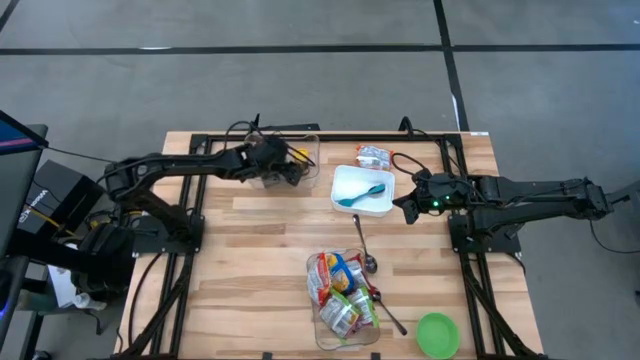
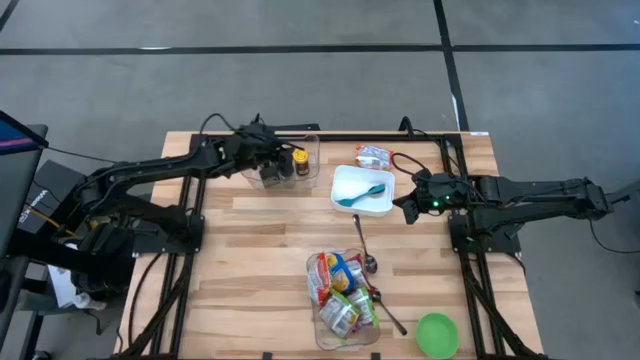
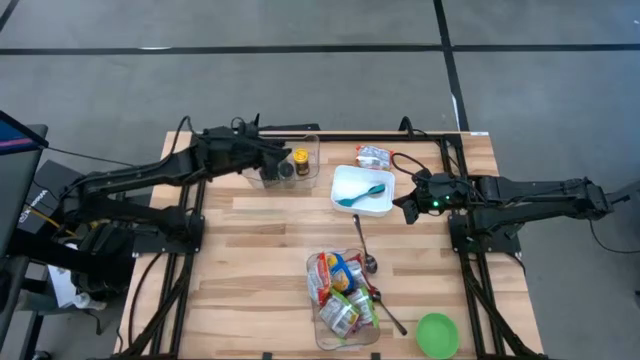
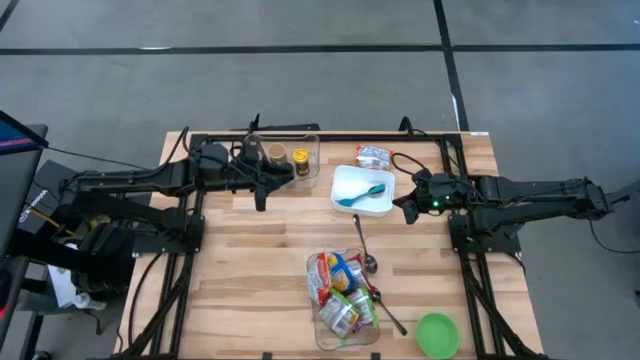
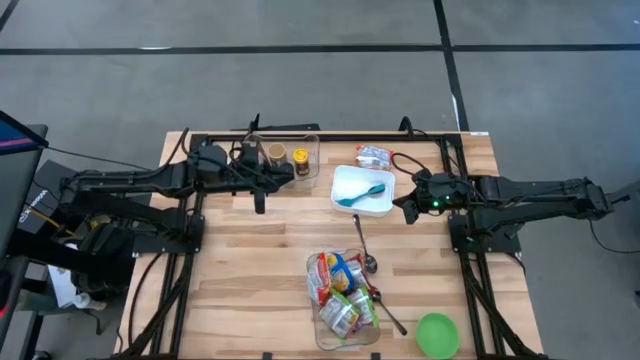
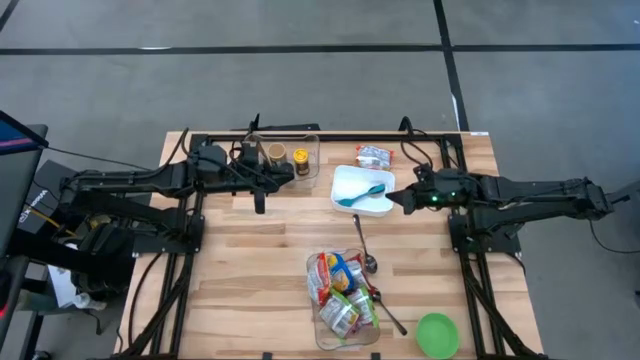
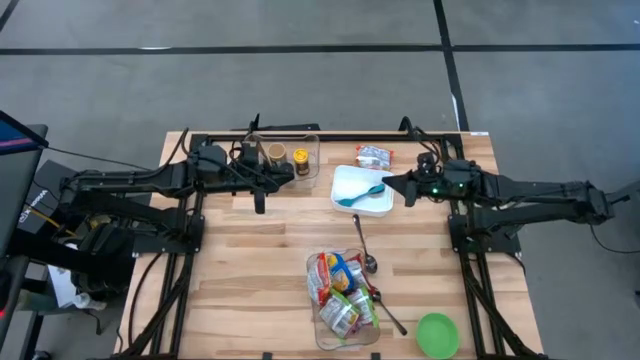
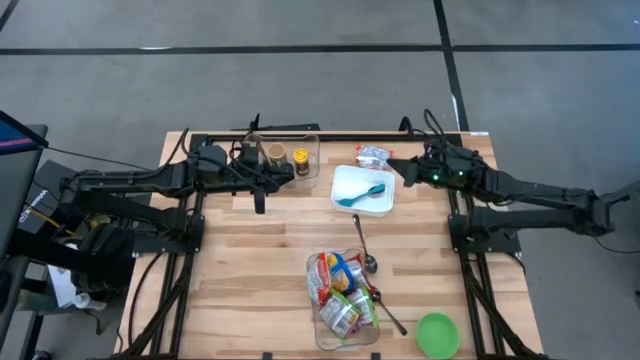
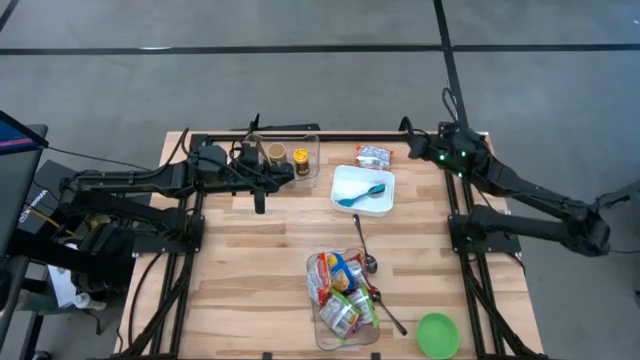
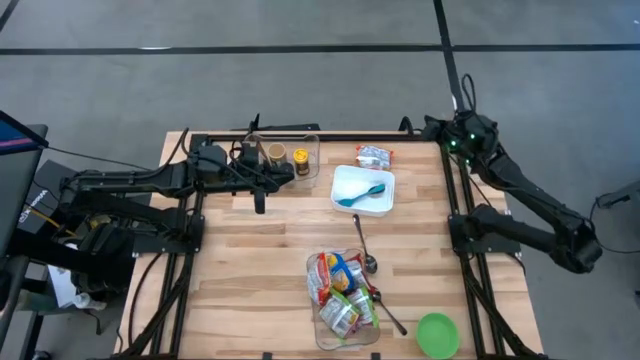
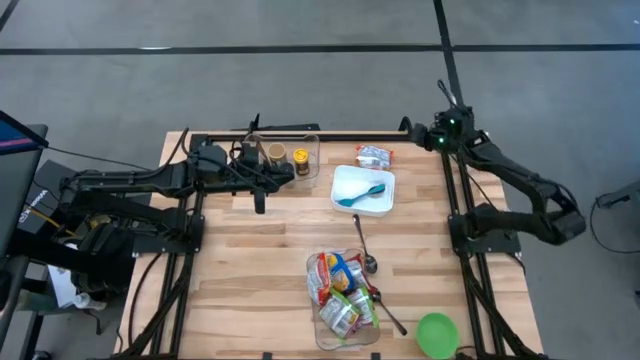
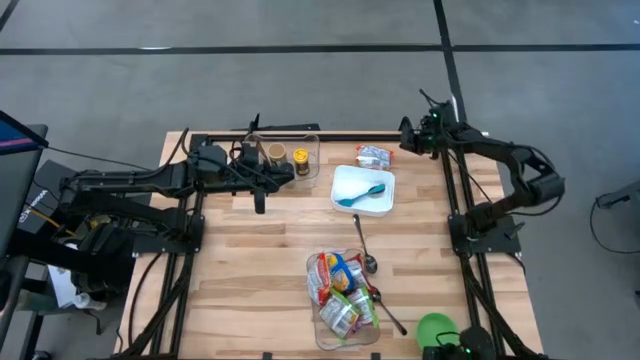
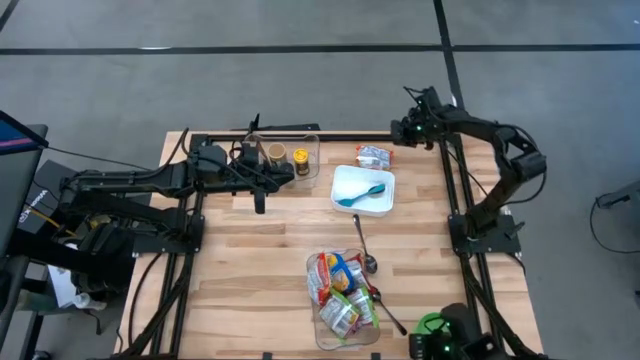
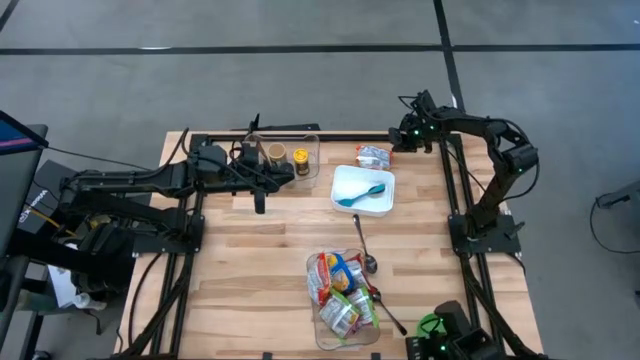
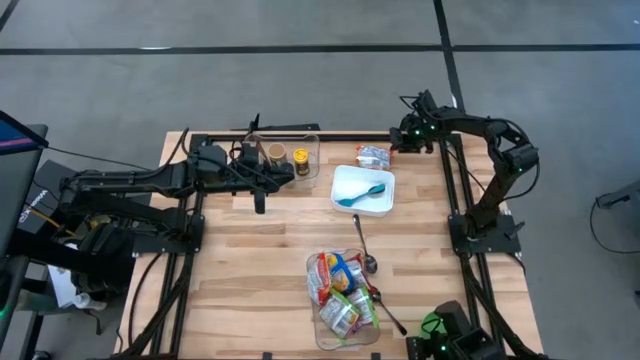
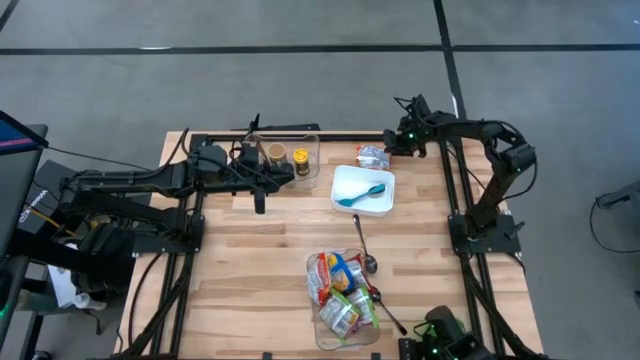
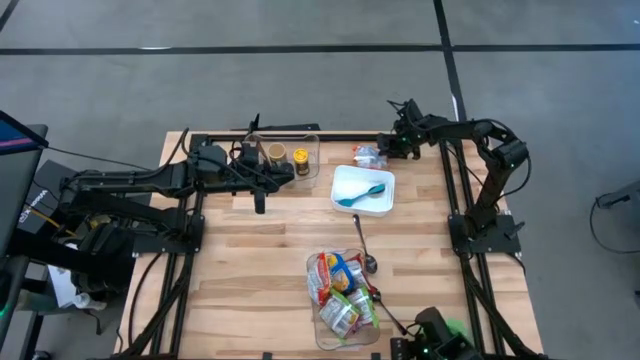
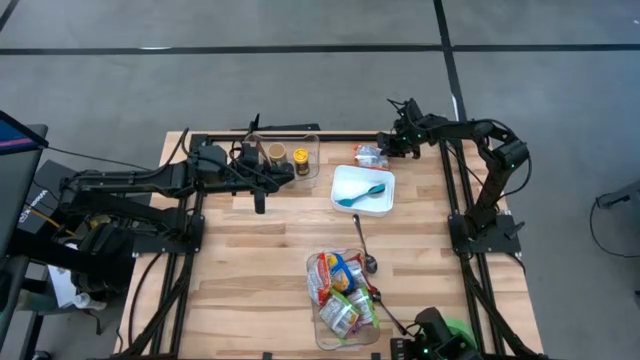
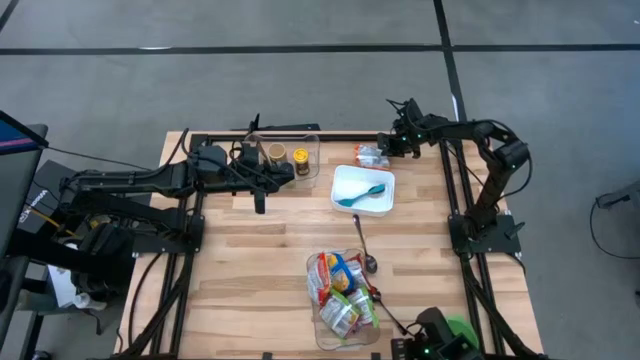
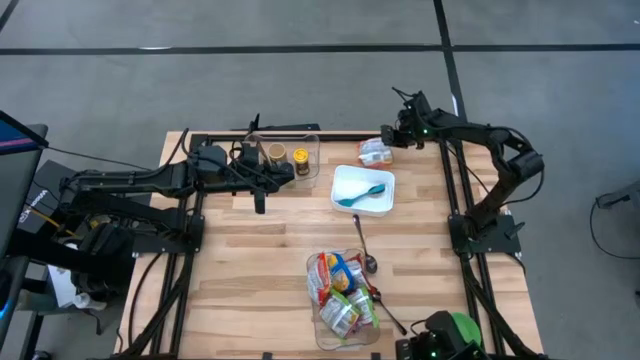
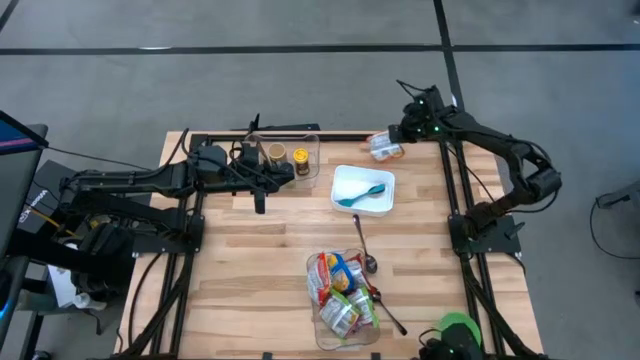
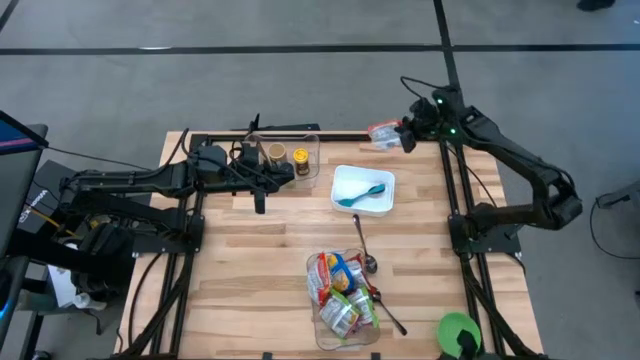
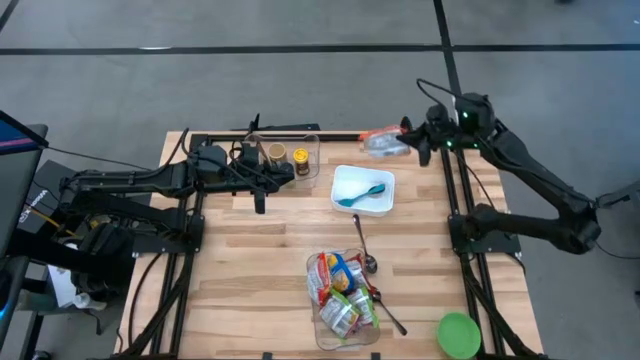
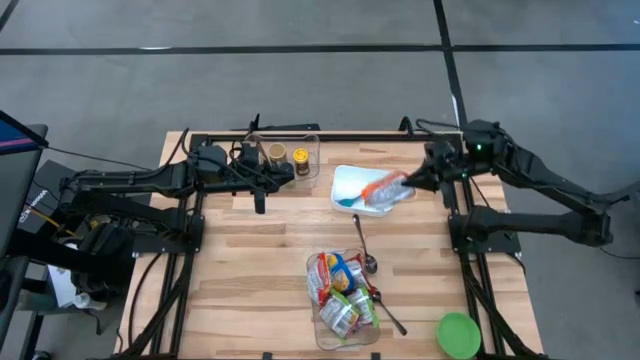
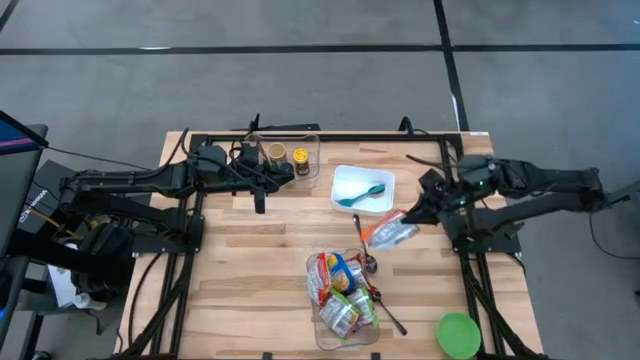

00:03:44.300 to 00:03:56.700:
Task: Pick & Place Food Item
Put the orange noodle pack into the bottom transparent bin

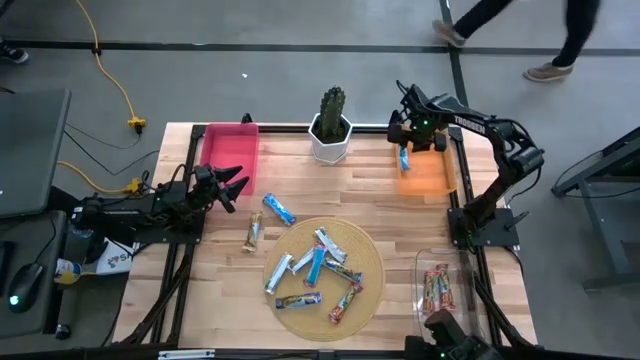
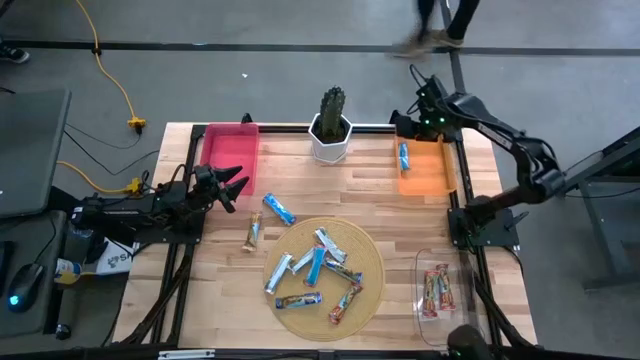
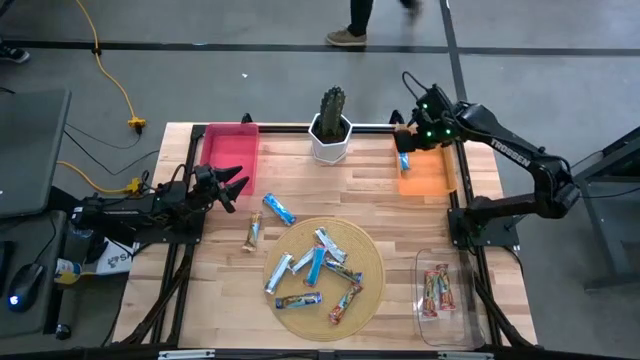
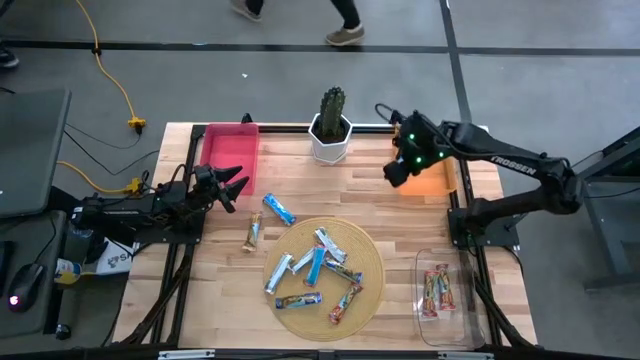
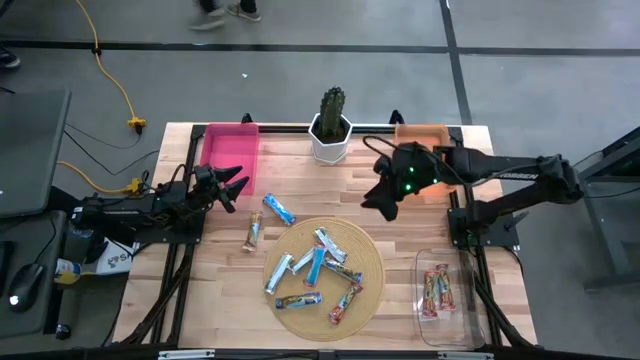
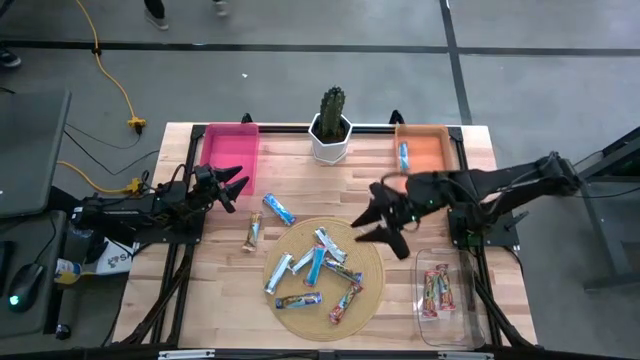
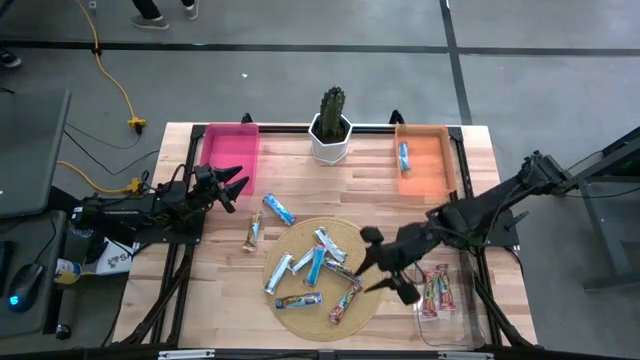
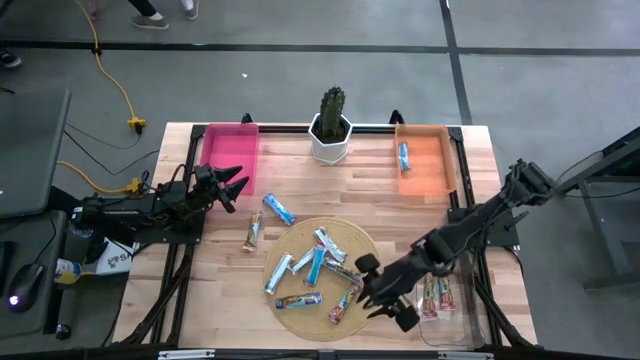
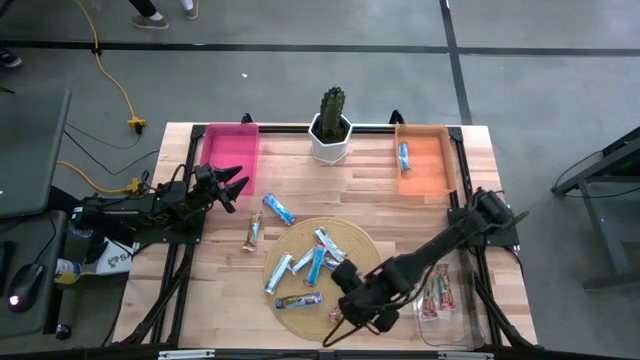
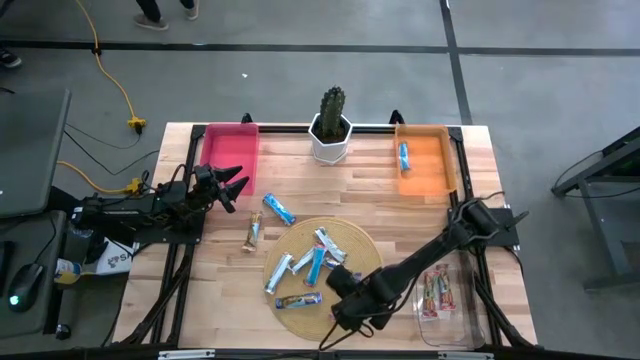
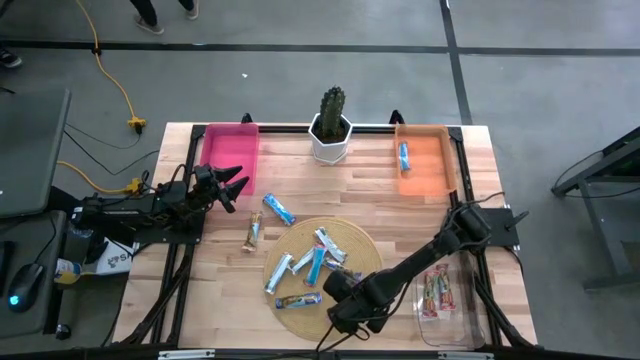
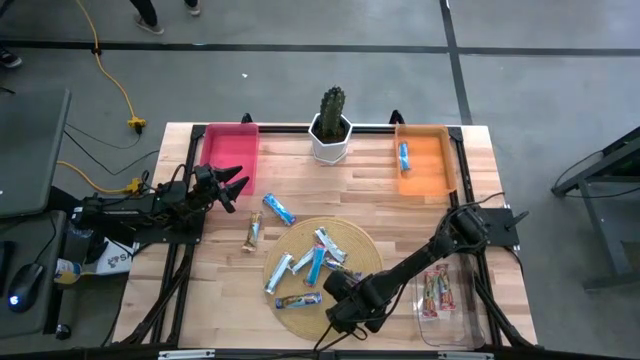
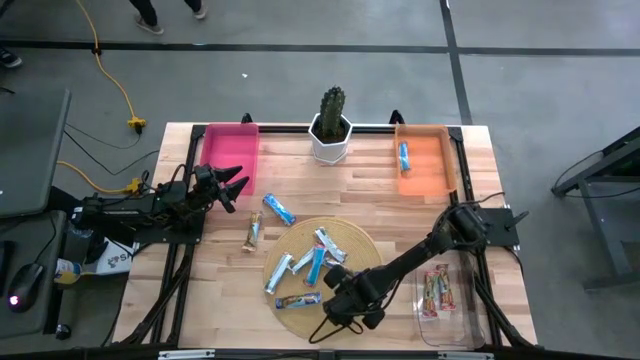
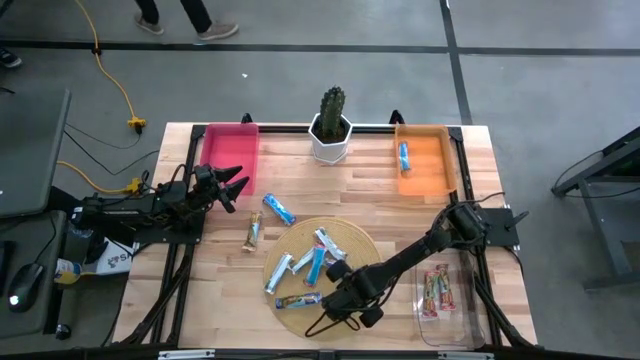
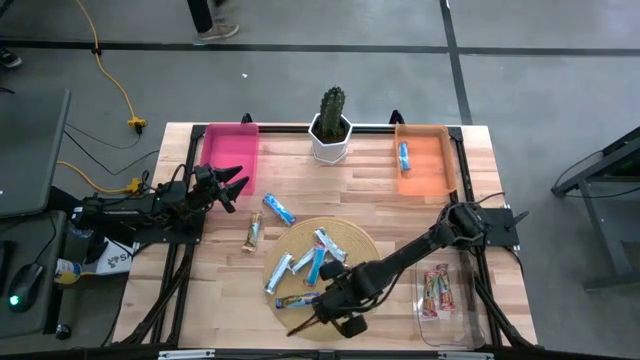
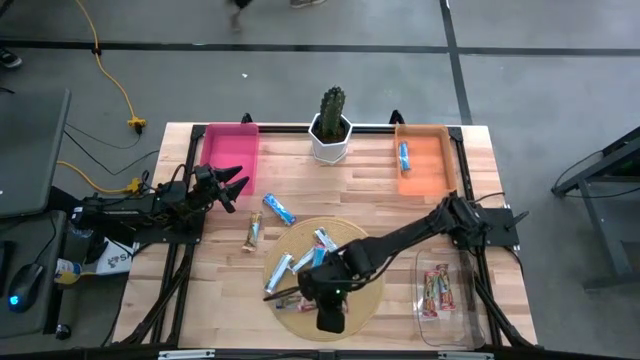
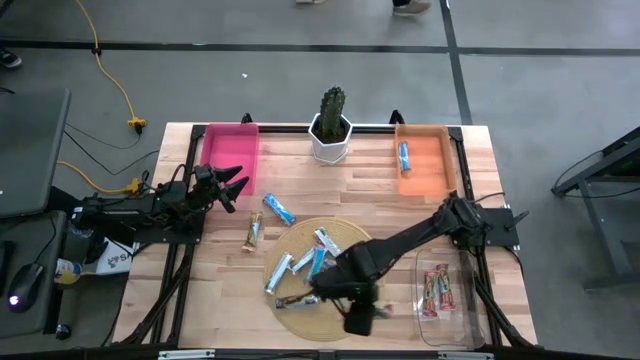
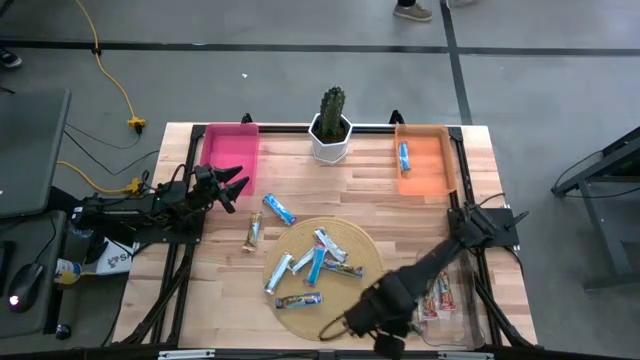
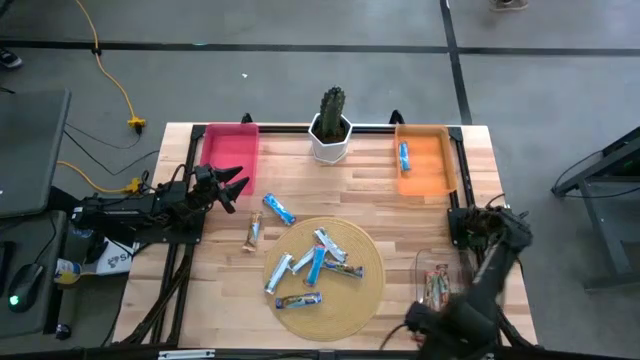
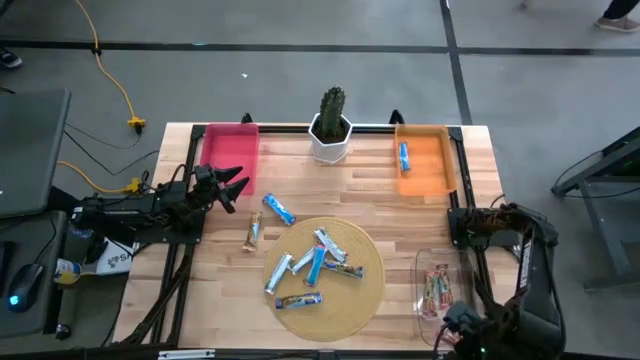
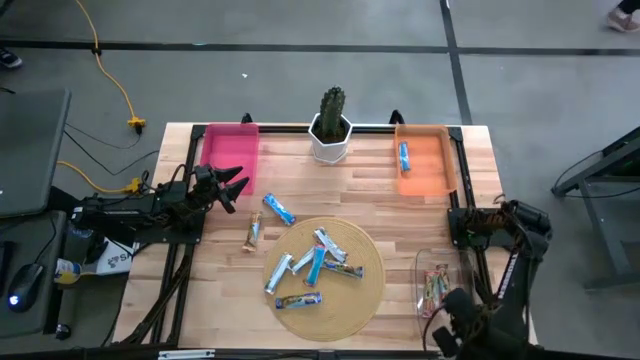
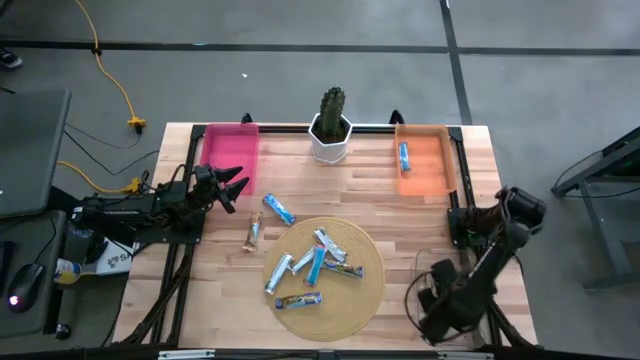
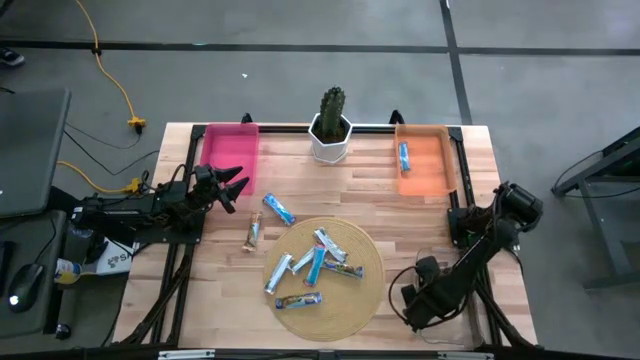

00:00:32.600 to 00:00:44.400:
Task: Pick and place Granola Bars by type
Put the red granola bar into the transparent bin
